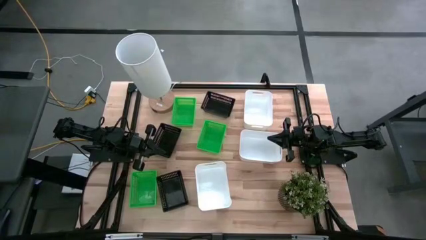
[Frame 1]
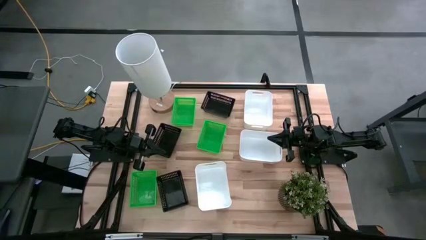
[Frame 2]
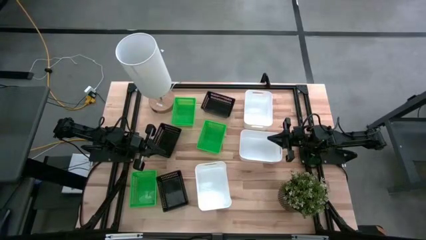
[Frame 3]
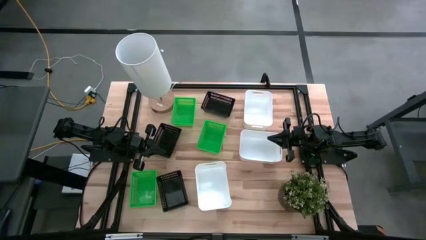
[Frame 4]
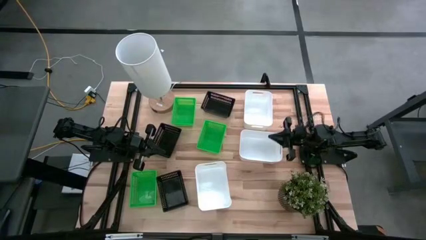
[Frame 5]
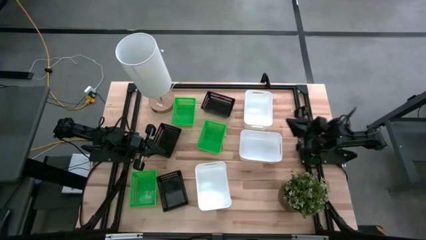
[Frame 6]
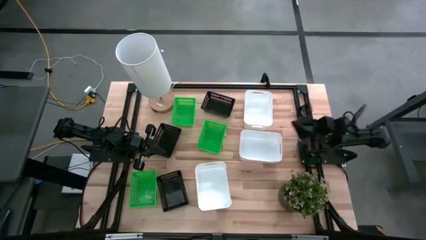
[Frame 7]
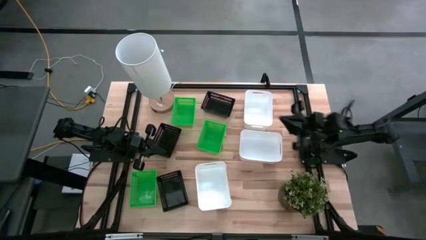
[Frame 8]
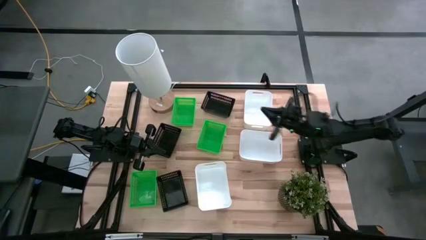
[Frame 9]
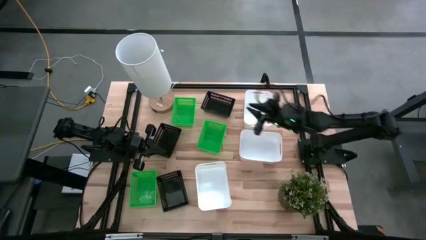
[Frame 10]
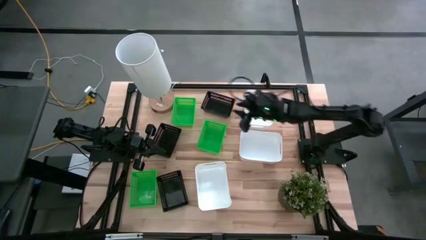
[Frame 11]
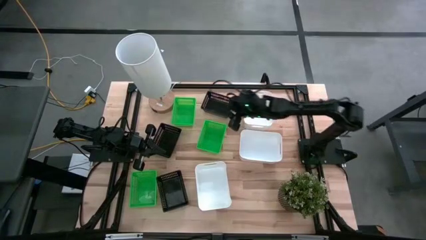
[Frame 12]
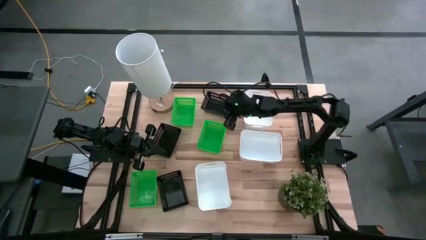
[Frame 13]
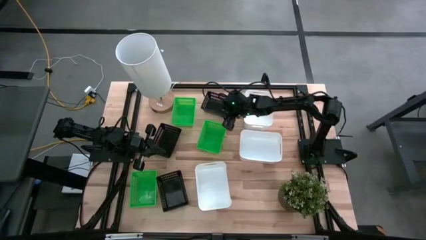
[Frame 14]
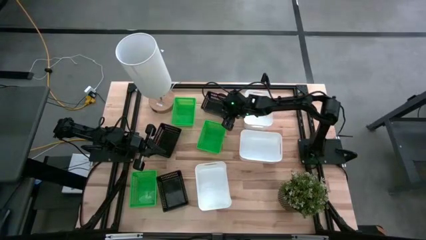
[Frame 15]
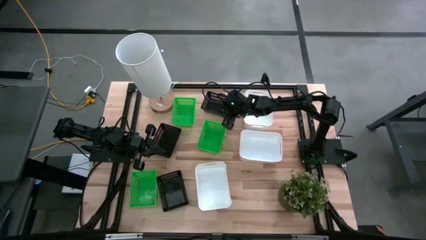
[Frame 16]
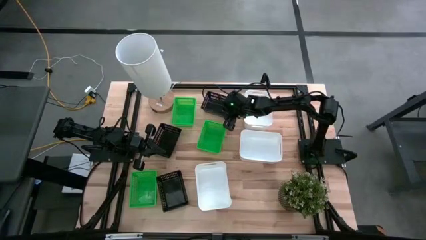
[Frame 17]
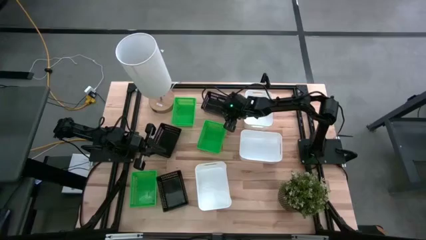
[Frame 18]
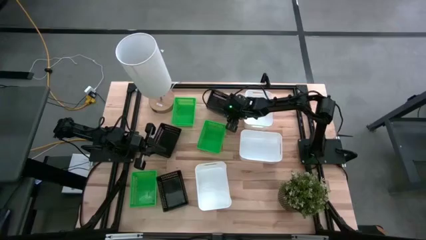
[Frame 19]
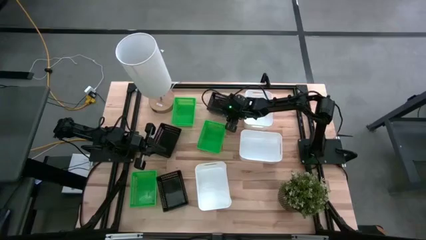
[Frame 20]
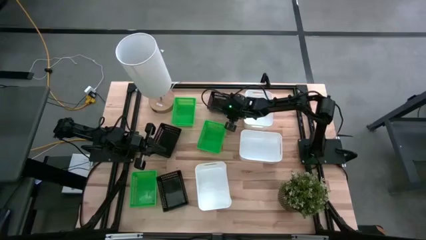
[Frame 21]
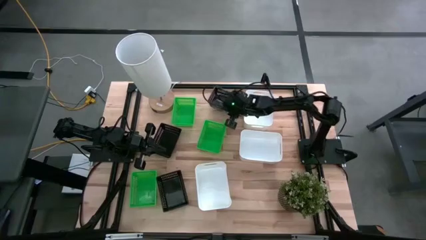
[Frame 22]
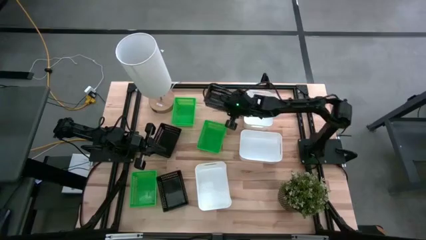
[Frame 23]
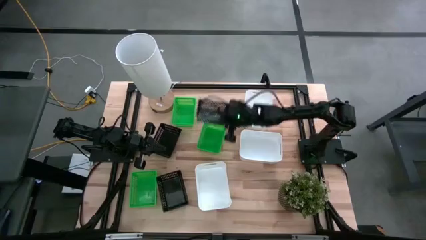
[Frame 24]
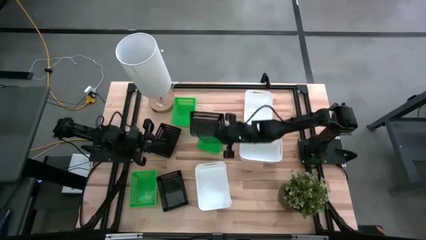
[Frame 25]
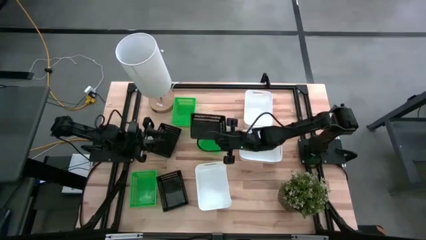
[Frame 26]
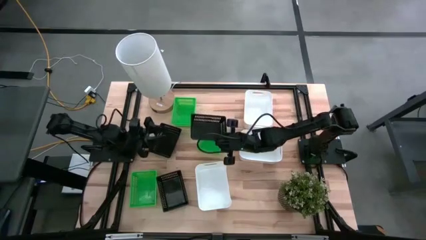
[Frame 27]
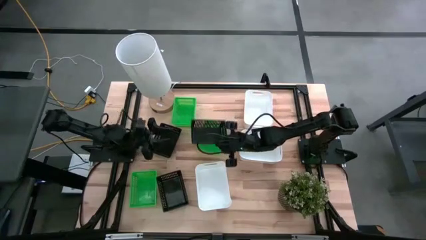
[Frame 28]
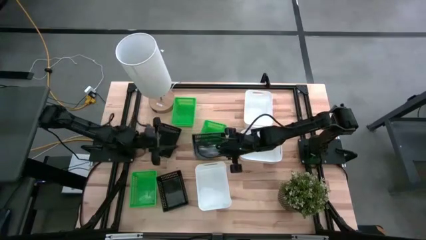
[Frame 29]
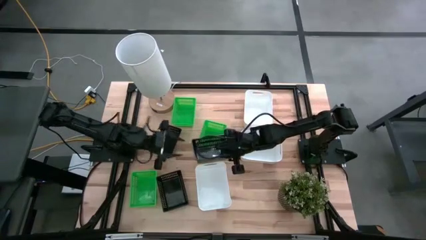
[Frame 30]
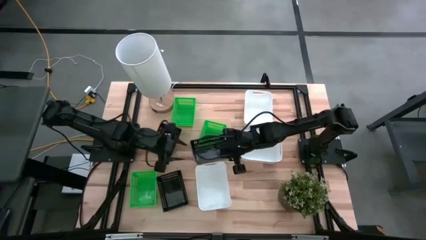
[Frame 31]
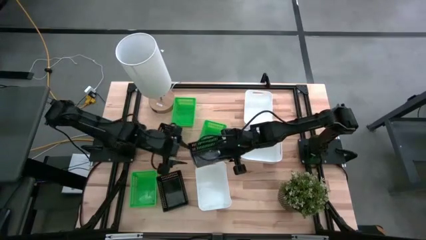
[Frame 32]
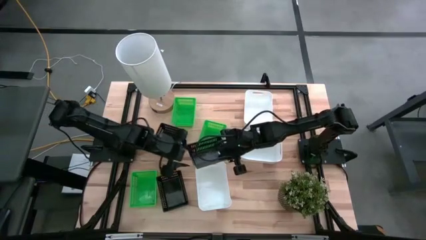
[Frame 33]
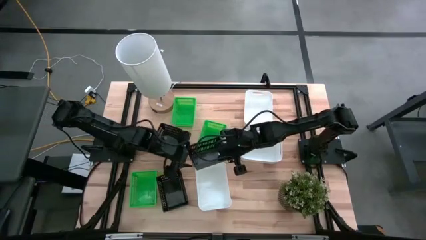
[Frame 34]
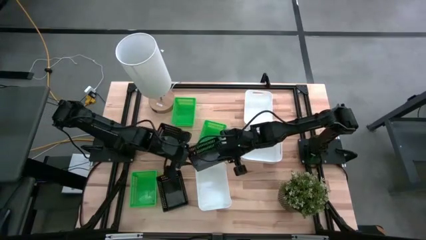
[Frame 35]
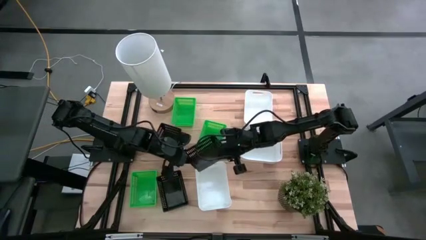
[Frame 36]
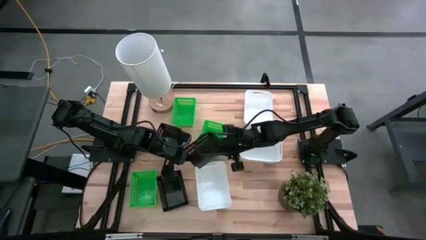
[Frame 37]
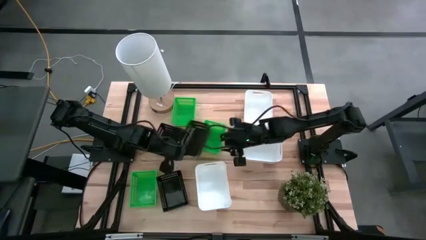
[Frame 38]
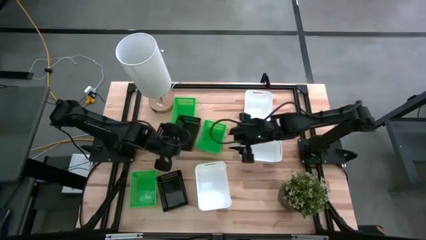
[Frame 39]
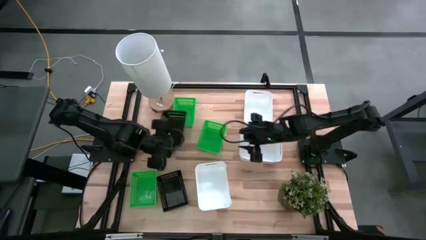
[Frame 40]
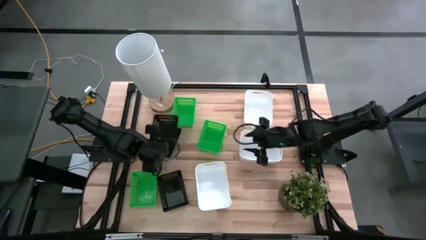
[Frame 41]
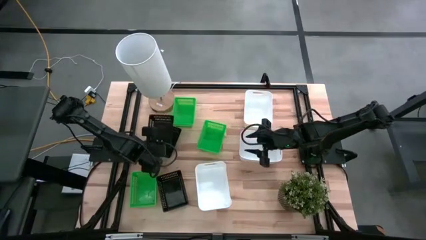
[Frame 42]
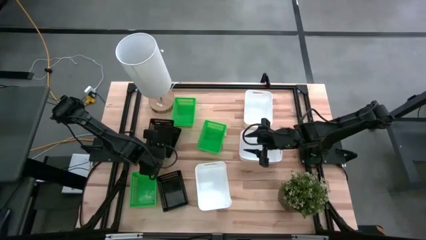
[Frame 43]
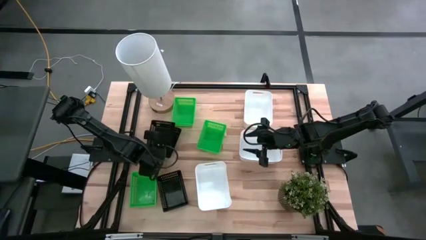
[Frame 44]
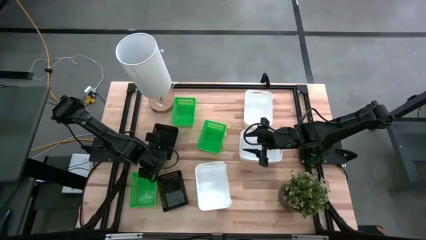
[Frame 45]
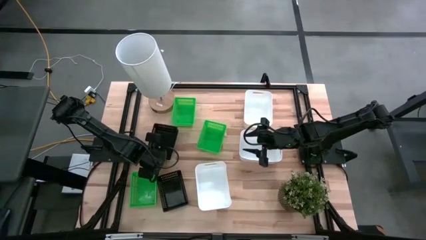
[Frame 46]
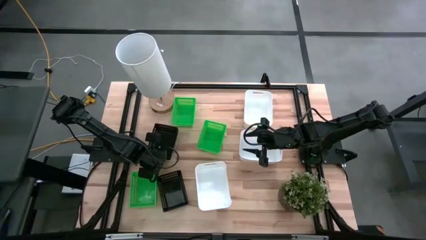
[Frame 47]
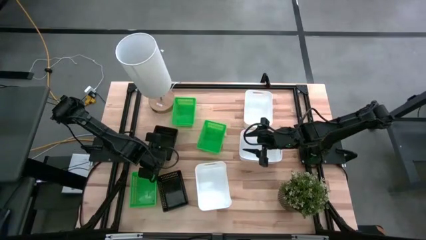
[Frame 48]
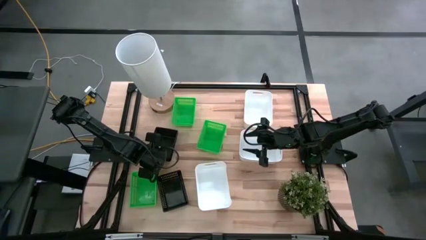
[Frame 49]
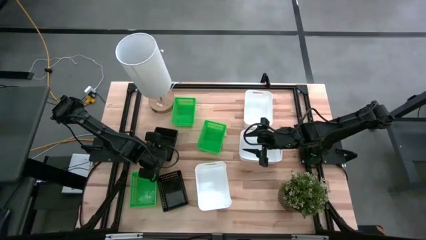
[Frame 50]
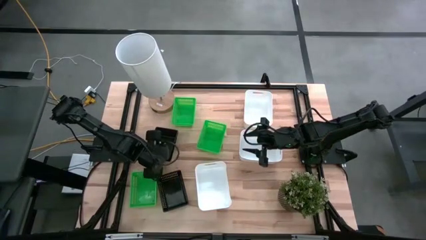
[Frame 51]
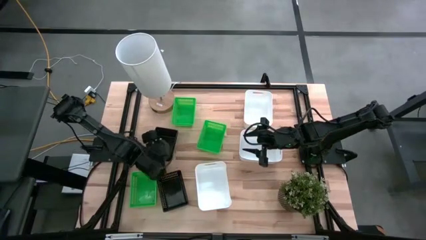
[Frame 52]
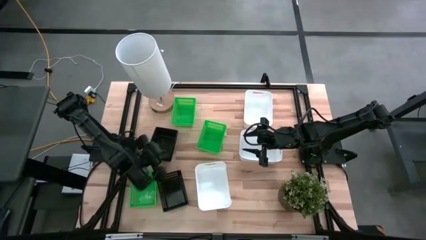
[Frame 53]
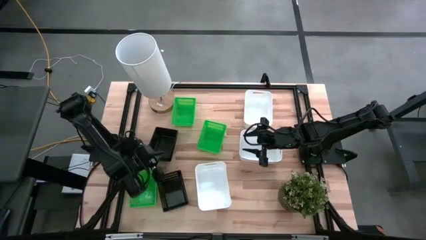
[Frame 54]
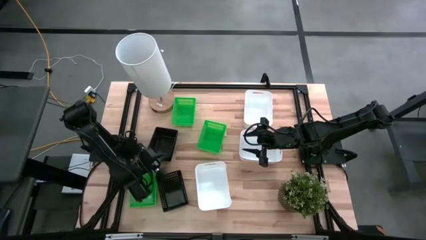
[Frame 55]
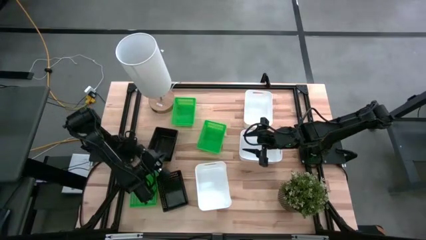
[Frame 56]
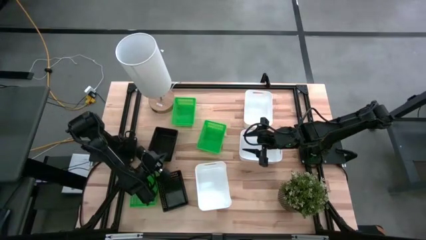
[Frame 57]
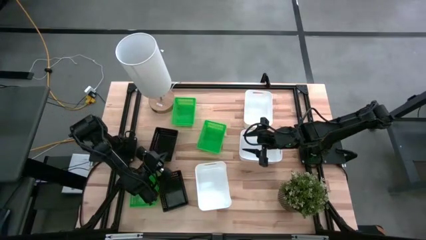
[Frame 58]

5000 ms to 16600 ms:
Stack the top right black bin on the middle black bin

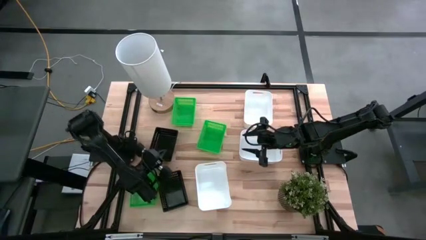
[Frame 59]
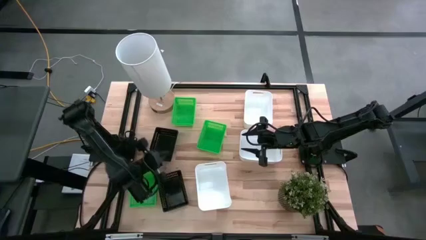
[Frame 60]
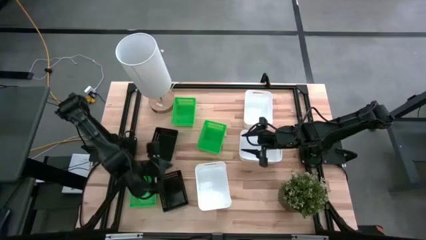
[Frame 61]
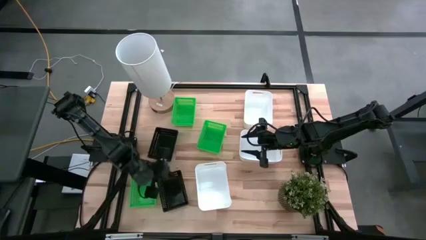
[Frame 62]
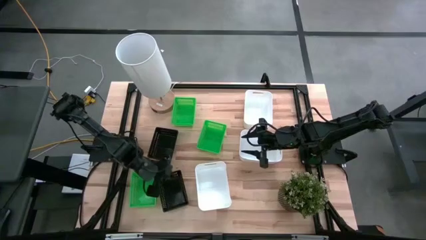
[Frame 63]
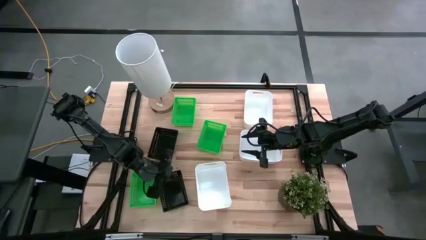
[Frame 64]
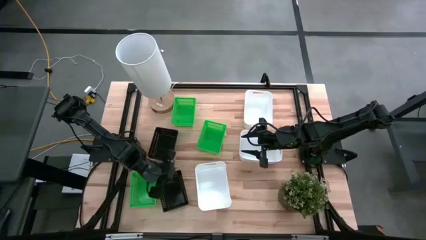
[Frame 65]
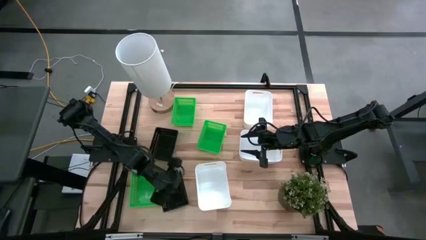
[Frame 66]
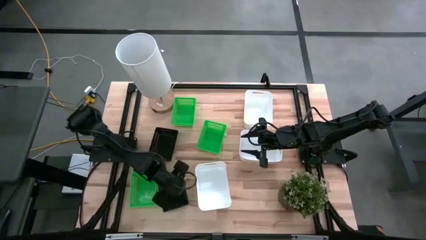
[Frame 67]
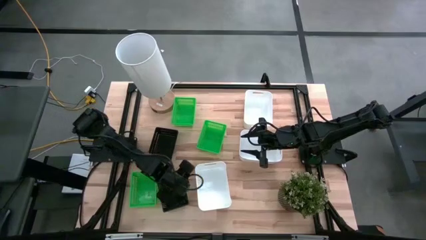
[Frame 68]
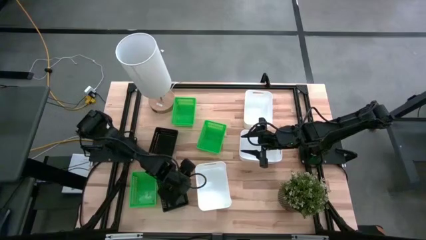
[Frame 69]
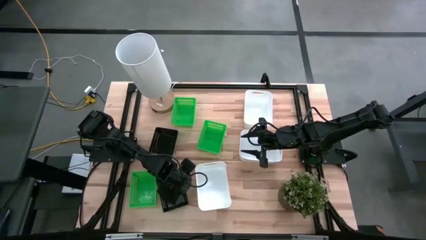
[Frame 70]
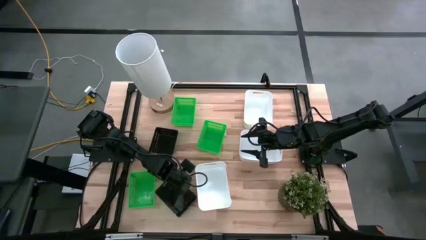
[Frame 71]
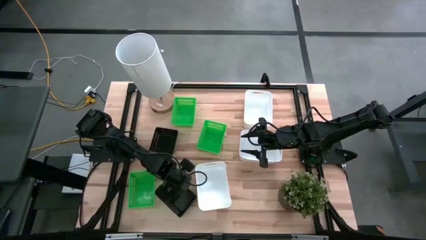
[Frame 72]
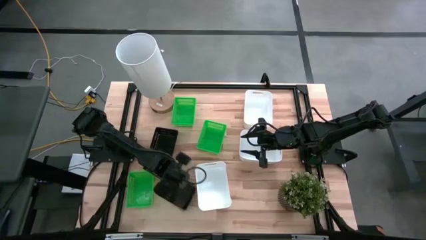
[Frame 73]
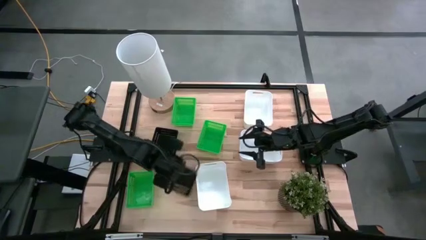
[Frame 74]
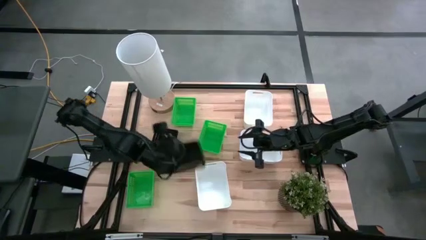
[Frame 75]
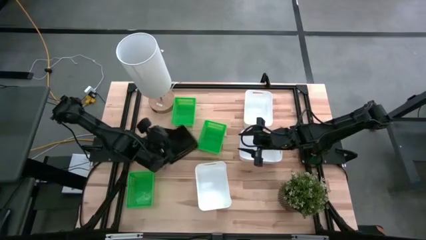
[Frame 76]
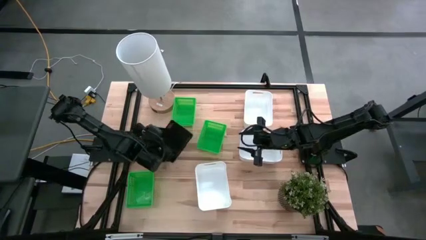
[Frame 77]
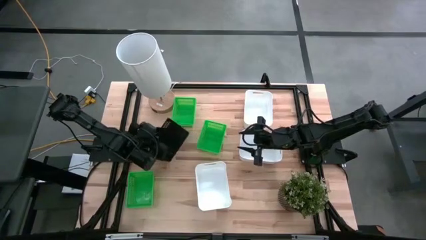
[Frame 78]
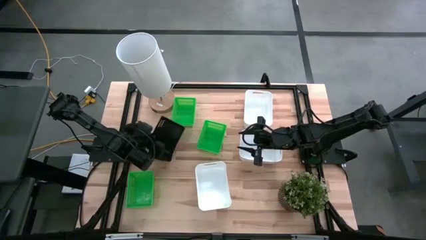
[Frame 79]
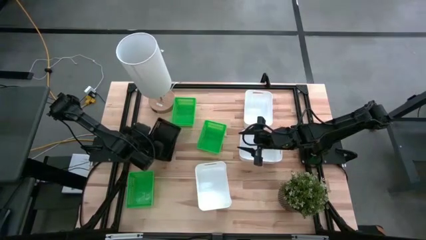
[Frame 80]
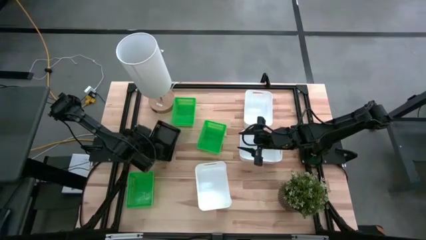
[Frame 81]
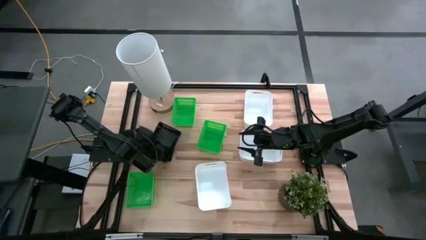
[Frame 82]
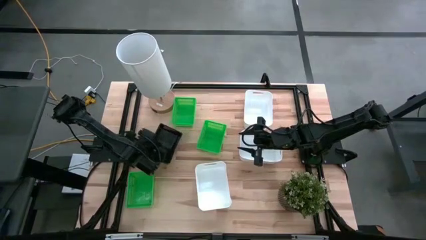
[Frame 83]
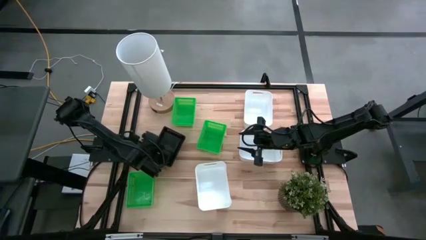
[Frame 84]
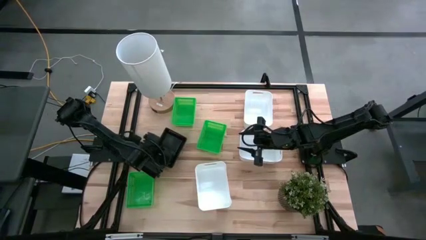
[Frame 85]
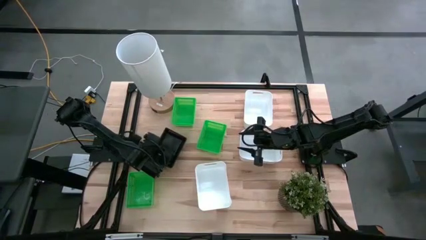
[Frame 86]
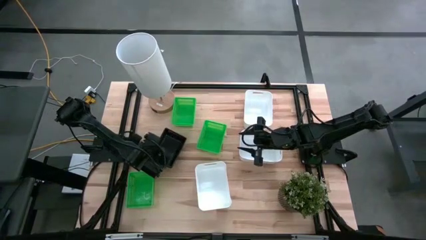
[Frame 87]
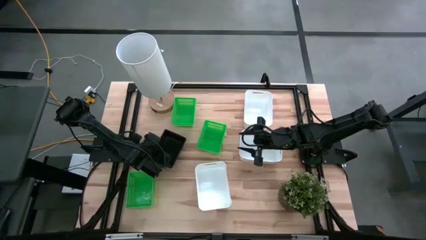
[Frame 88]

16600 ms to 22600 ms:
Stack the bottom black bin on the black bin
